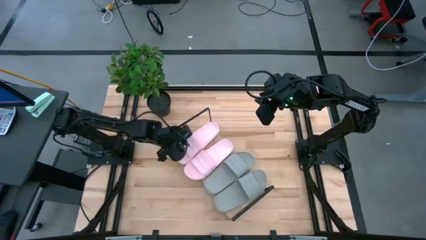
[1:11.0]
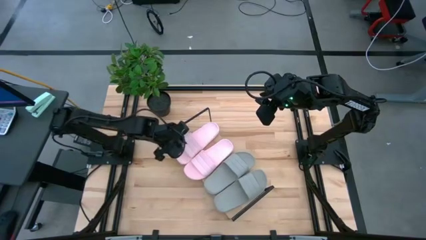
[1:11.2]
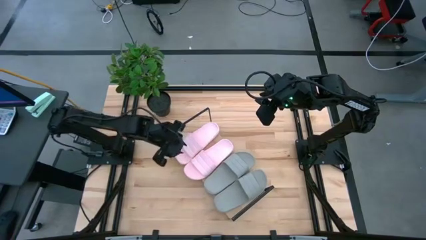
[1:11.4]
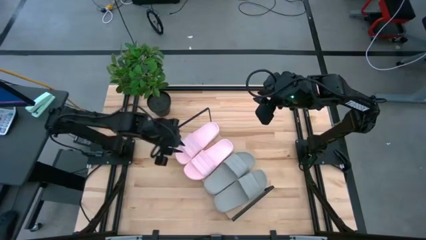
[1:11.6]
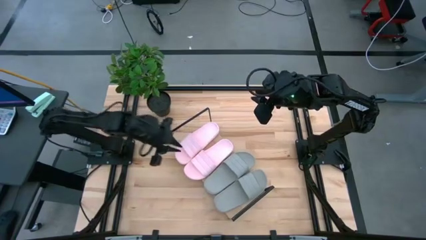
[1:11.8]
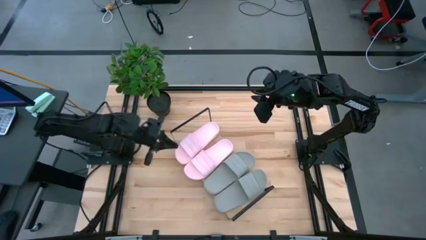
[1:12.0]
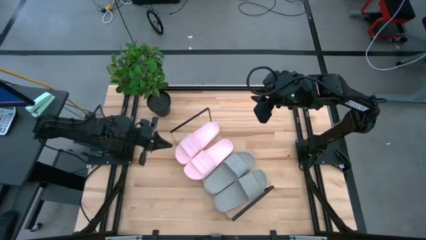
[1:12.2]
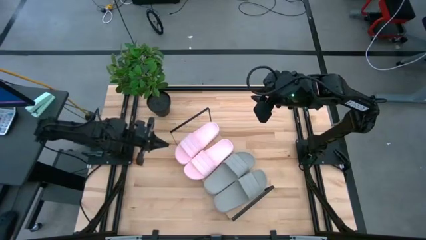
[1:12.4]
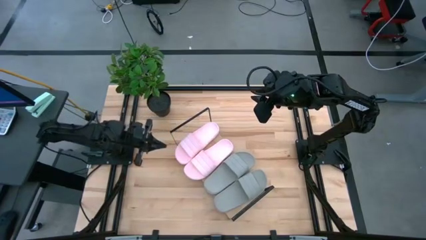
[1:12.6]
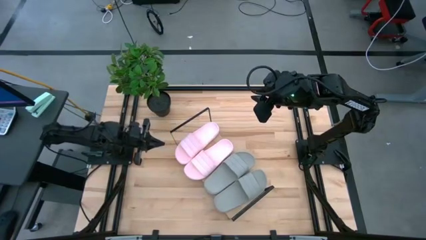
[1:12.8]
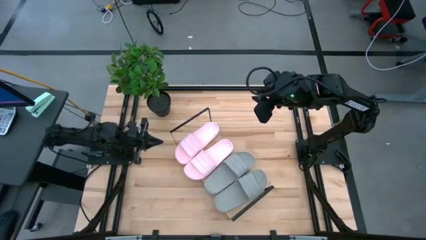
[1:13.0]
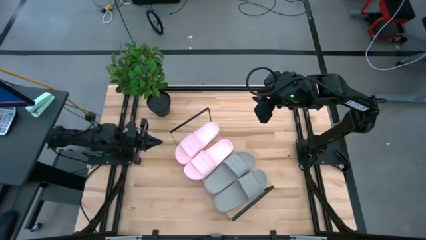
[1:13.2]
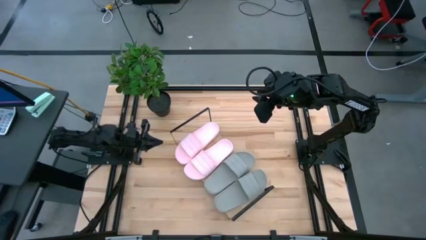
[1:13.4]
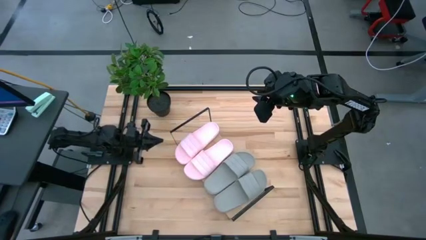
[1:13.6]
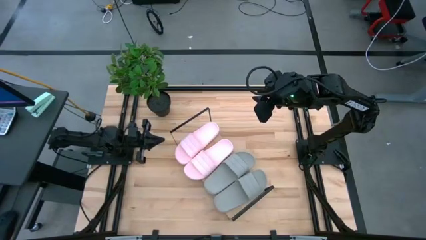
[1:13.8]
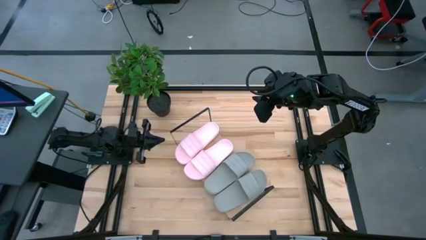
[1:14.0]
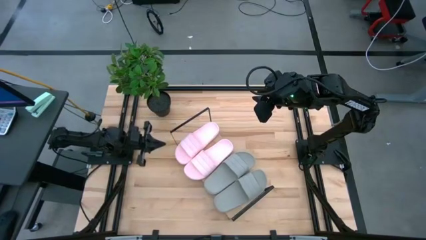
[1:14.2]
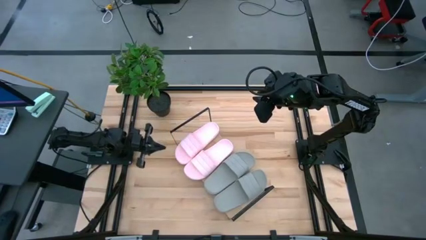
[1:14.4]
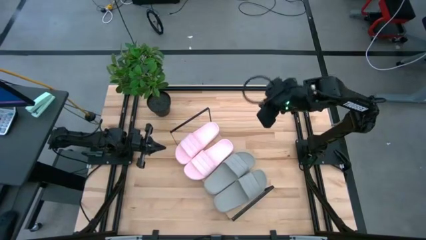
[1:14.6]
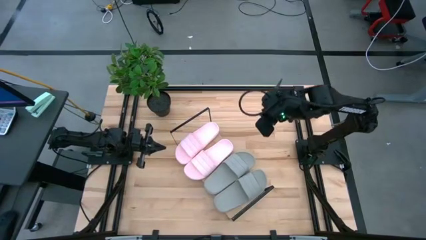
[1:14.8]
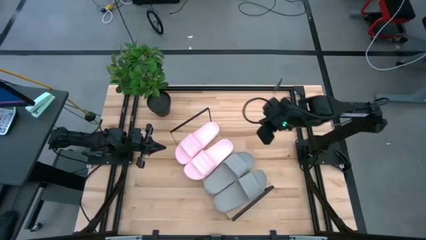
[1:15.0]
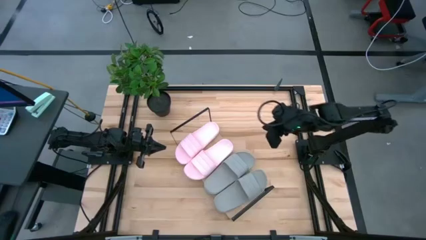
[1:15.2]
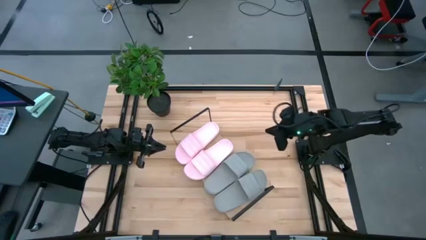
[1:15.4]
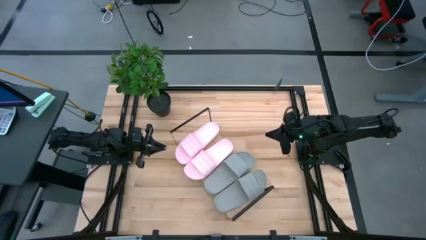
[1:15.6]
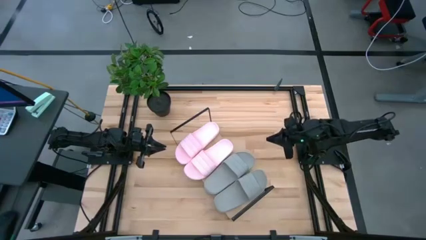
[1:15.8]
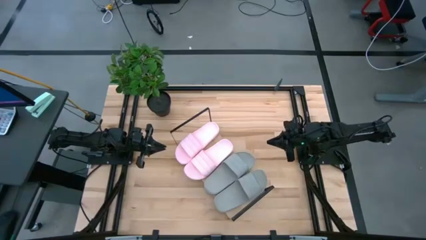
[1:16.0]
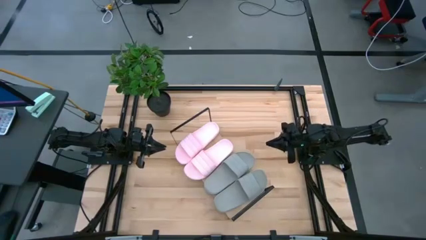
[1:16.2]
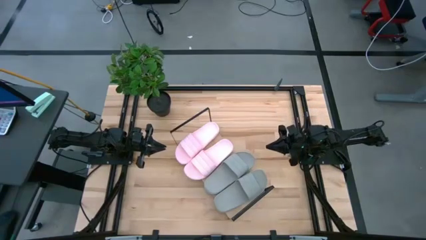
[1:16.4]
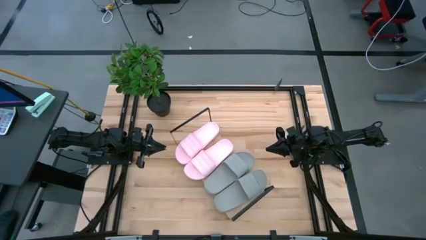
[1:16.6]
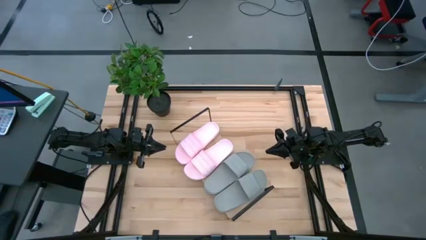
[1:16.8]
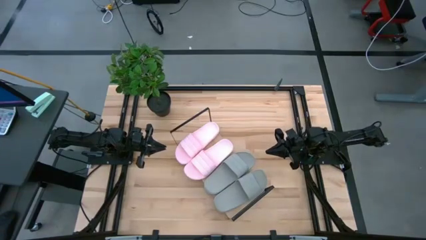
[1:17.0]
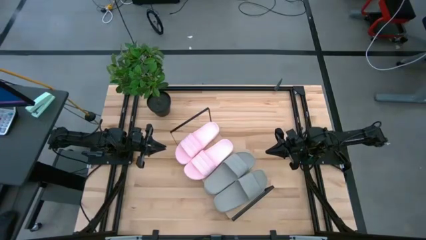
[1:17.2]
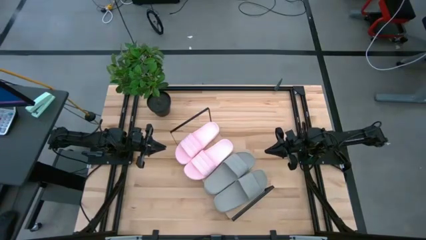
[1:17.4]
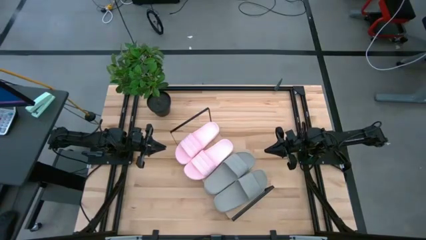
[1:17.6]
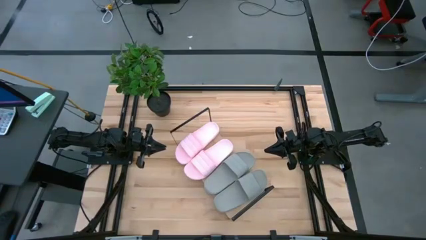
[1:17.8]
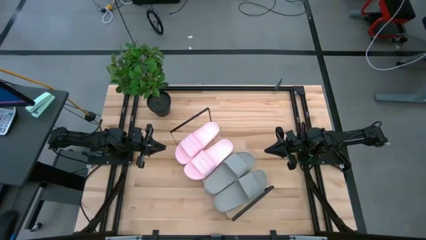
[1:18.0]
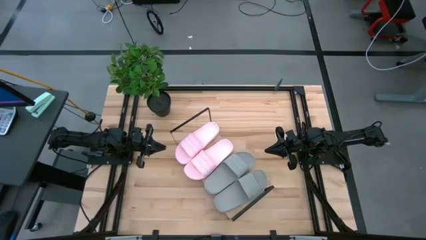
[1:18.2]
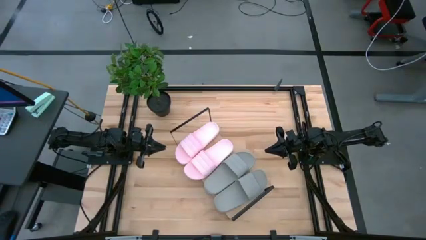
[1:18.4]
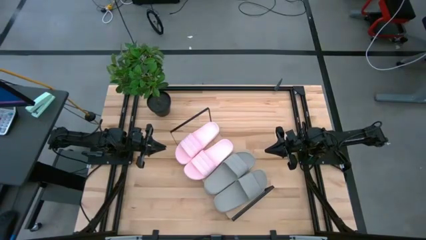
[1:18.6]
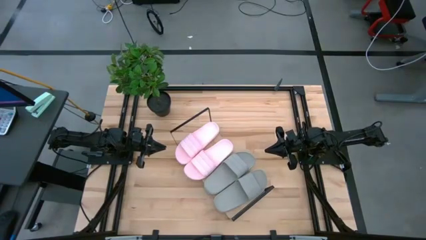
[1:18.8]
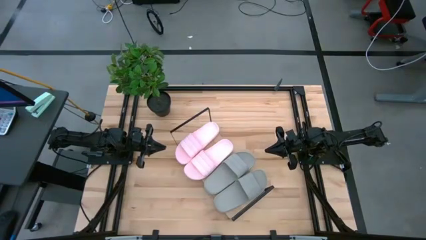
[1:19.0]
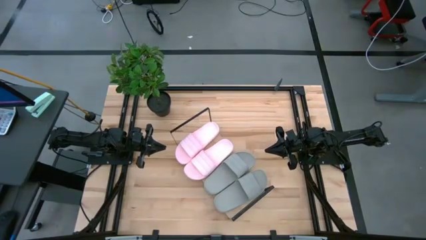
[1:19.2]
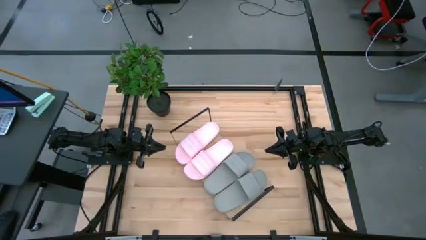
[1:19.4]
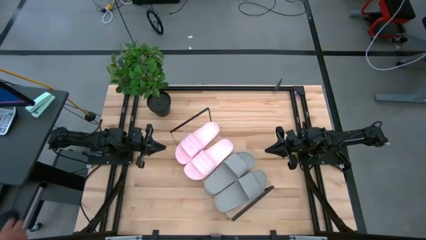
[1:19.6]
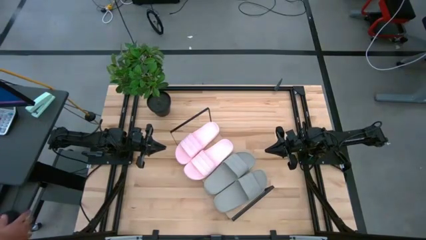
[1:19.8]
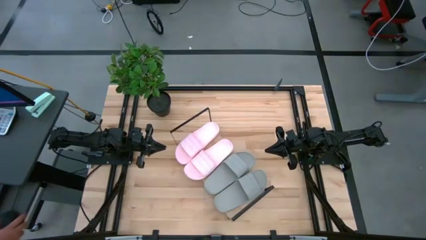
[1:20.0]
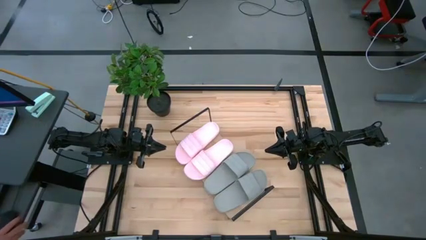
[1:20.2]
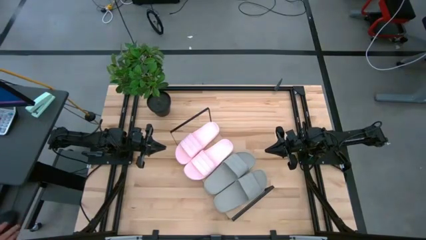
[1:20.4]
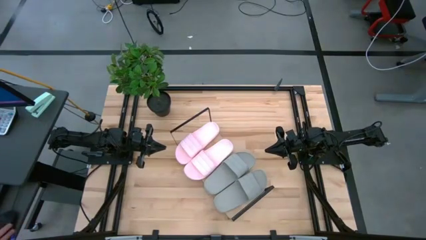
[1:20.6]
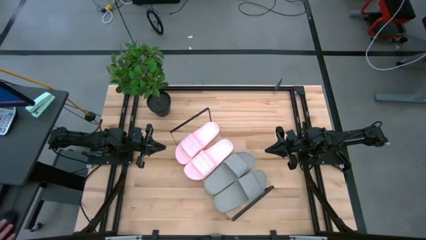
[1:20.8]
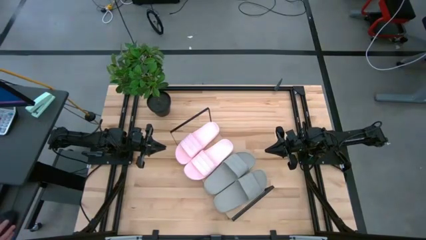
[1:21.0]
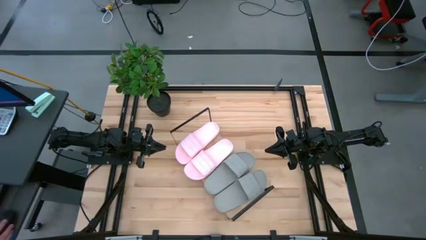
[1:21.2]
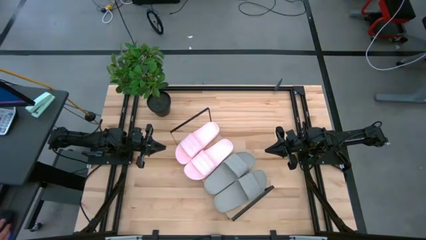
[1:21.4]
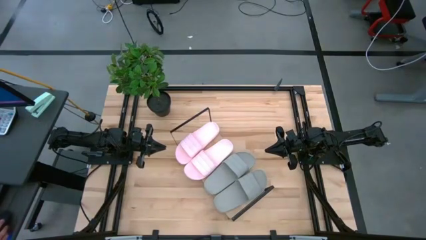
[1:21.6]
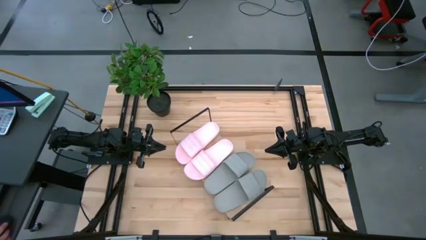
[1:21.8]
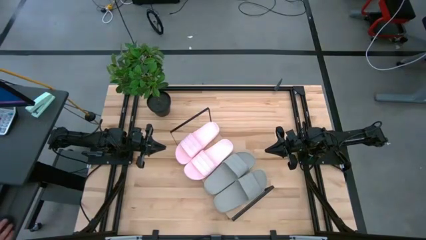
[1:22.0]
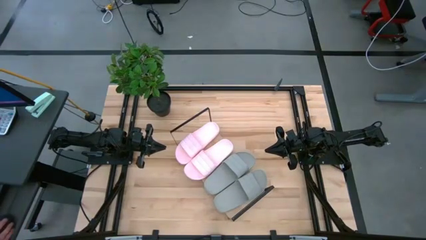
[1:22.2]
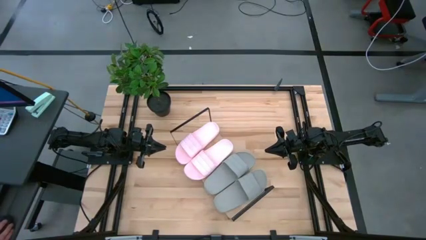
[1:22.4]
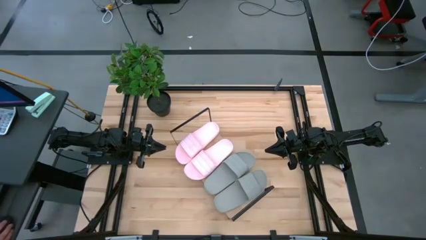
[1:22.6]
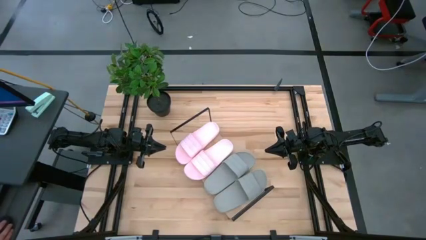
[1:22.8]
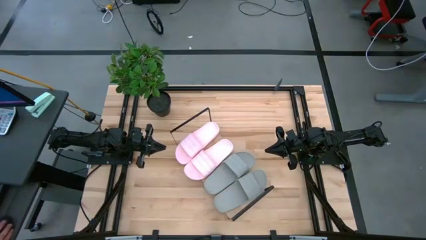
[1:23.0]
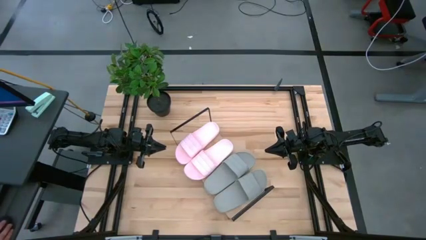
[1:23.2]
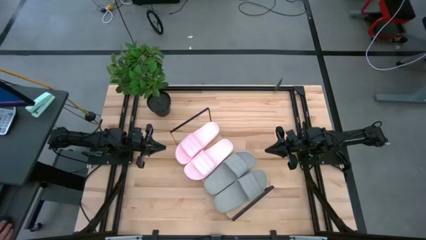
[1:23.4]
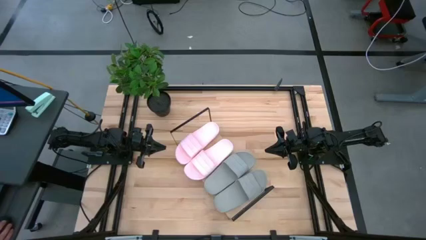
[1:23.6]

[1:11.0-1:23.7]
Task: Pick and place slides into the shelf
Return to Home Position

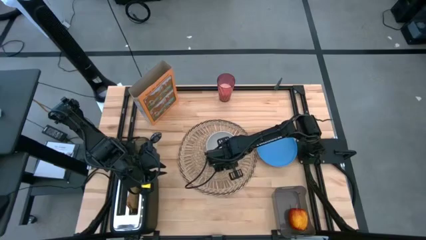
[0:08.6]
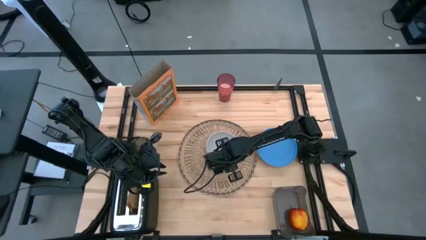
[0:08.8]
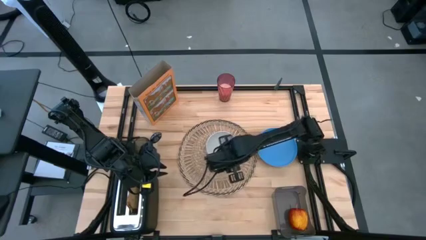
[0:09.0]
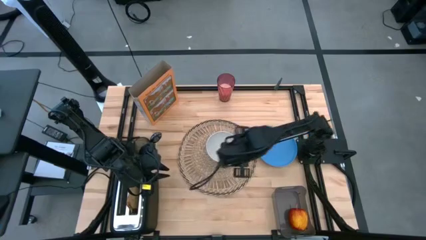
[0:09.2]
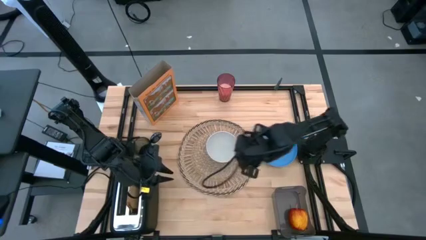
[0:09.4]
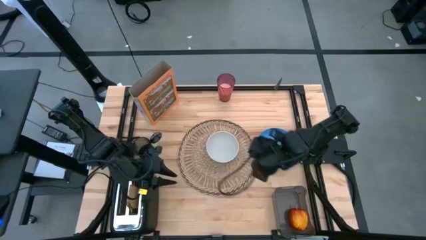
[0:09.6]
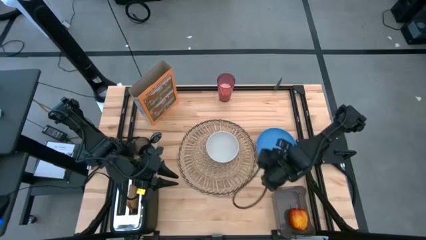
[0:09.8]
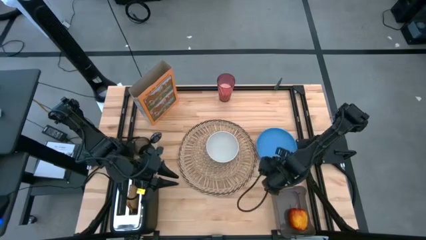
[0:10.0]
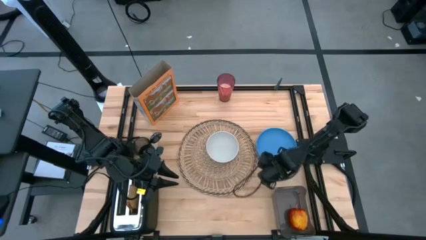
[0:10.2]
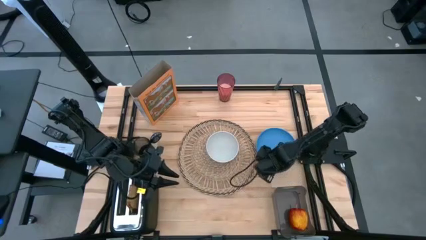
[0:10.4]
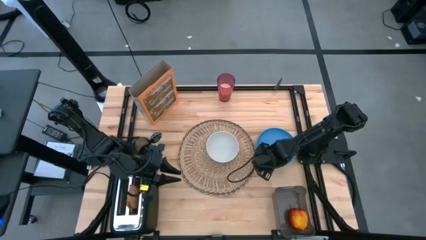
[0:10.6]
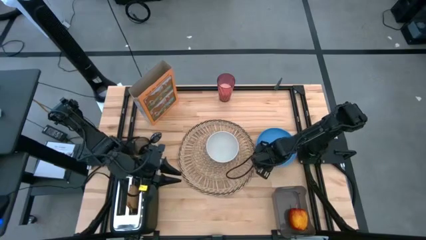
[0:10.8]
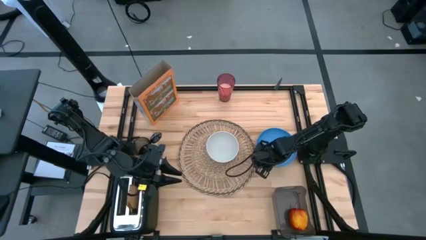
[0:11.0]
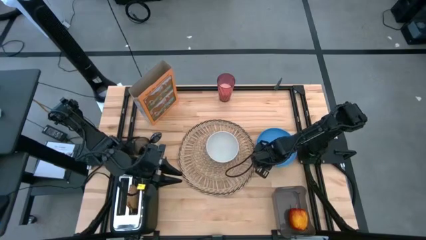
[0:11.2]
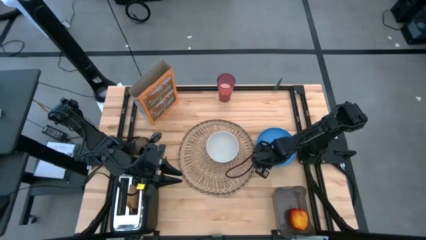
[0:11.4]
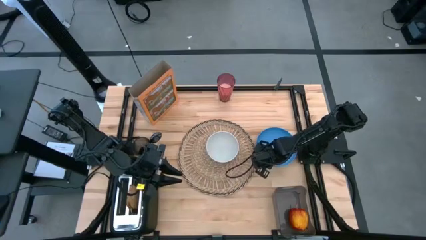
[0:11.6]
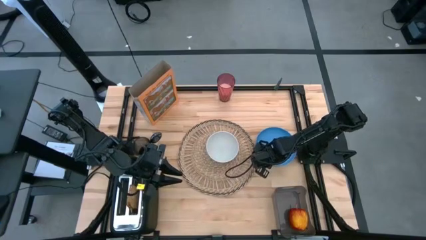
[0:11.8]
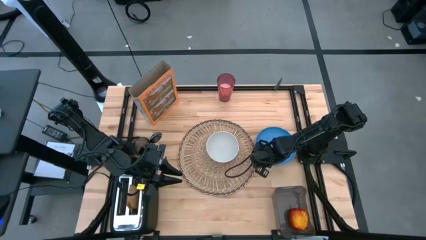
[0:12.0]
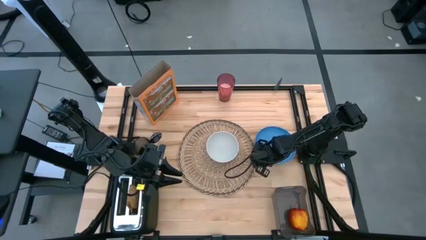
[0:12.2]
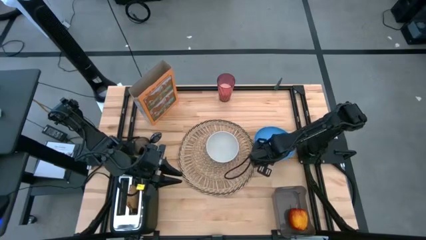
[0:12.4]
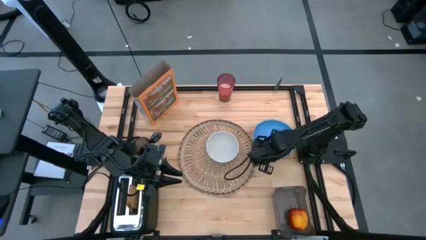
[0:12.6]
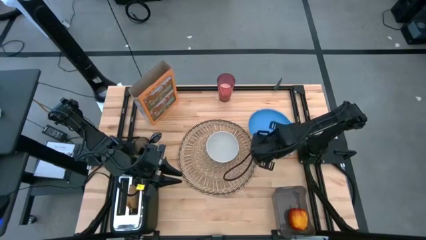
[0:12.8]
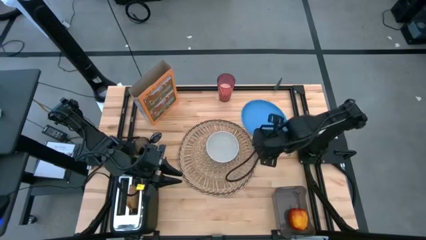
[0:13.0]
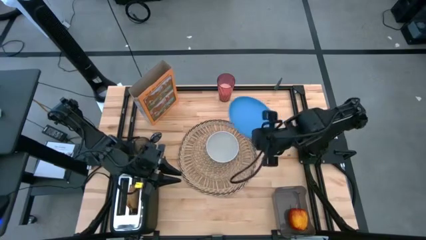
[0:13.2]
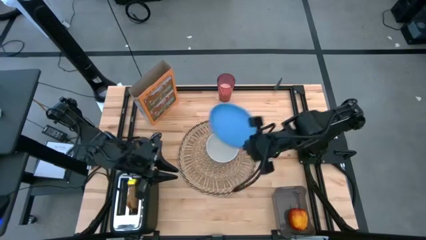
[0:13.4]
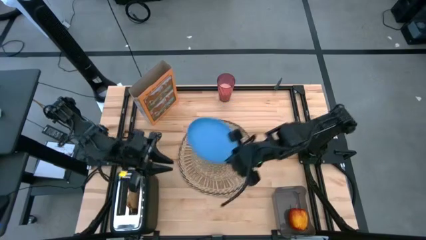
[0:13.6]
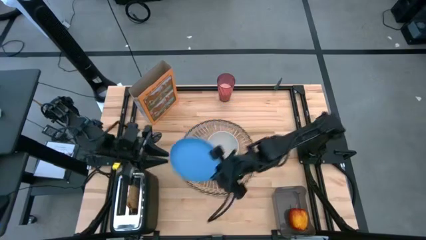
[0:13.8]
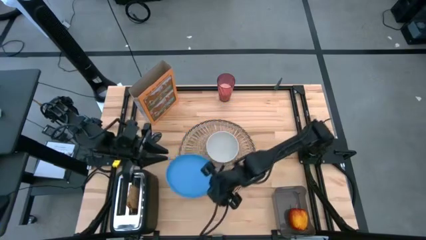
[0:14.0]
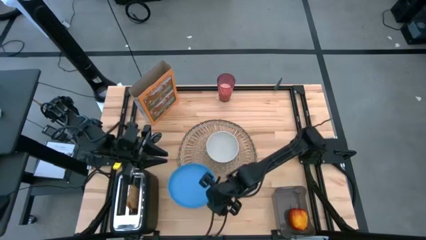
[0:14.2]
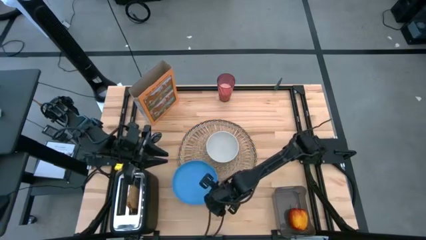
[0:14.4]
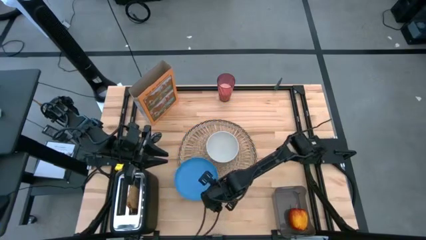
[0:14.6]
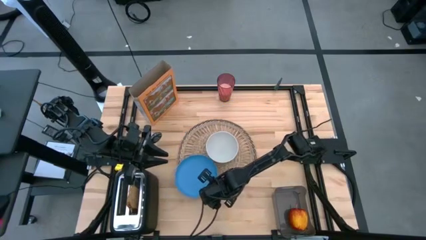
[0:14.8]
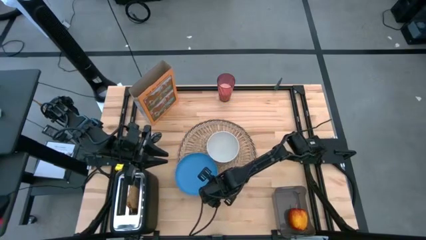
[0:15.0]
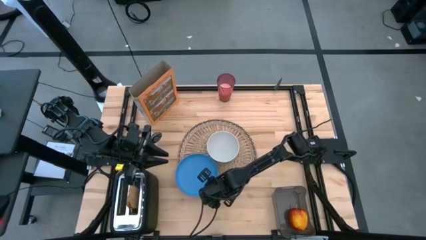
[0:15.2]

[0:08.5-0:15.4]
Task: Arrange a breakfast setting
Put the blue plate on the table mat
